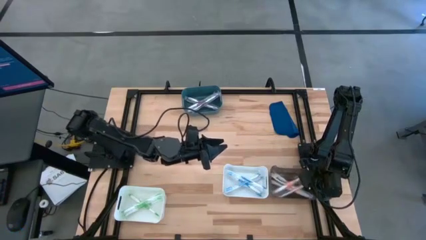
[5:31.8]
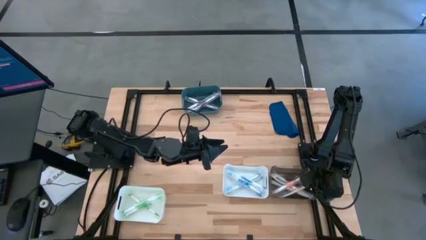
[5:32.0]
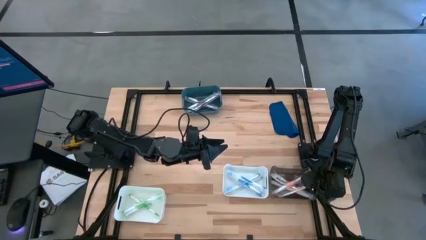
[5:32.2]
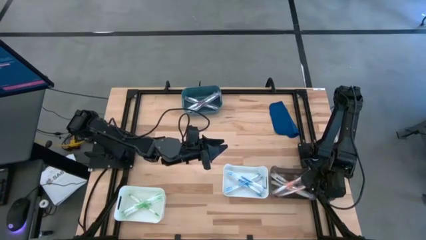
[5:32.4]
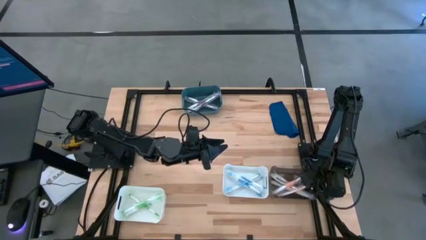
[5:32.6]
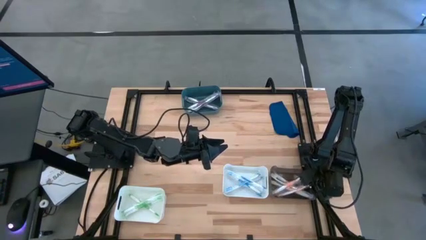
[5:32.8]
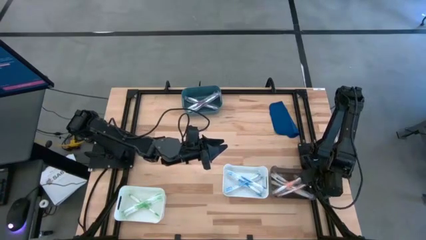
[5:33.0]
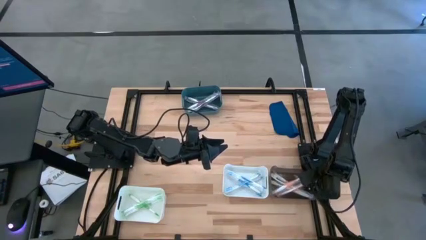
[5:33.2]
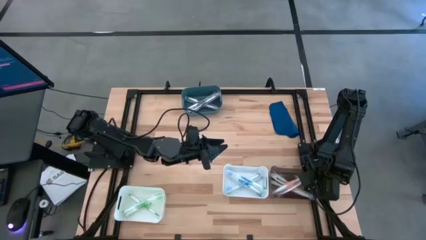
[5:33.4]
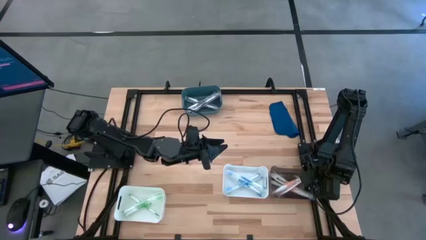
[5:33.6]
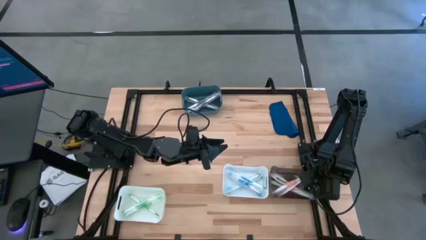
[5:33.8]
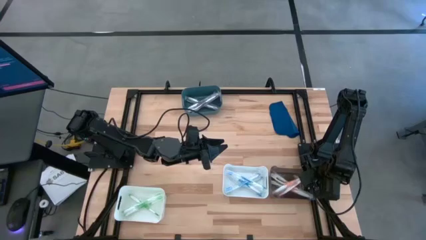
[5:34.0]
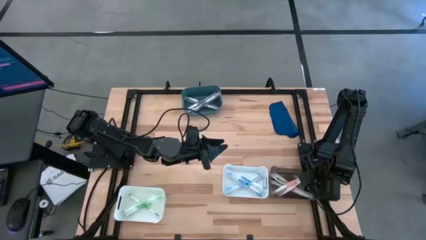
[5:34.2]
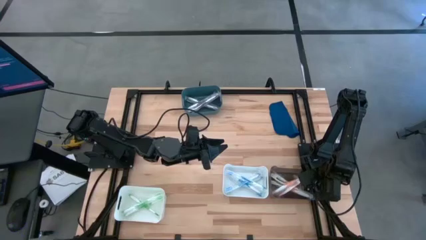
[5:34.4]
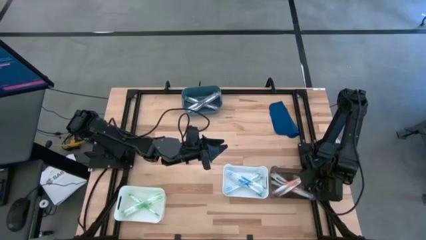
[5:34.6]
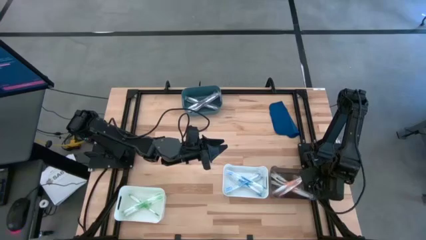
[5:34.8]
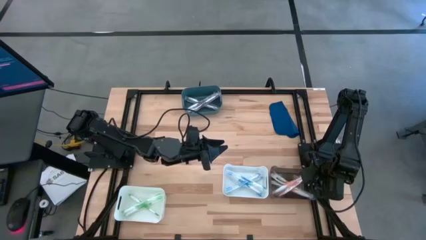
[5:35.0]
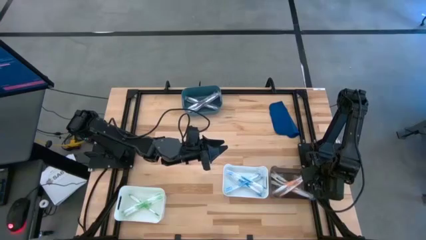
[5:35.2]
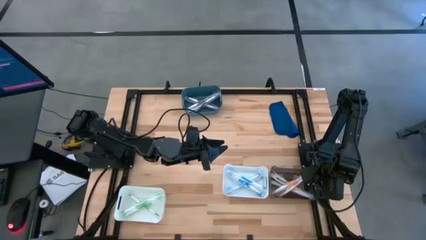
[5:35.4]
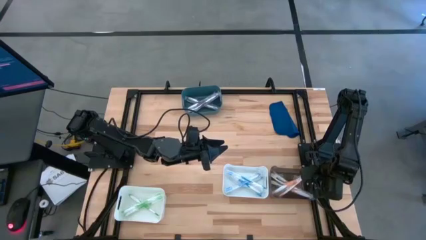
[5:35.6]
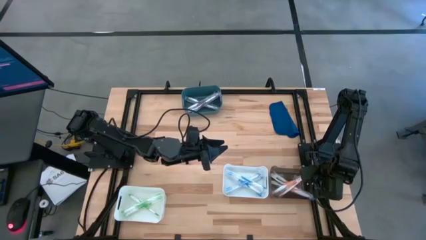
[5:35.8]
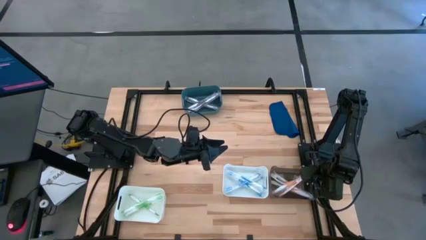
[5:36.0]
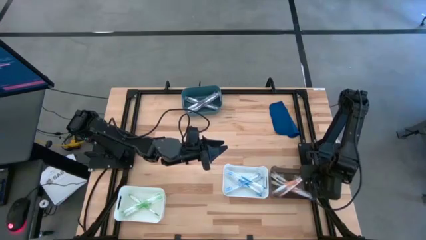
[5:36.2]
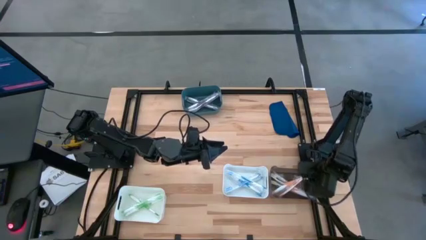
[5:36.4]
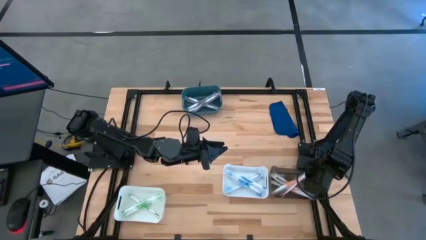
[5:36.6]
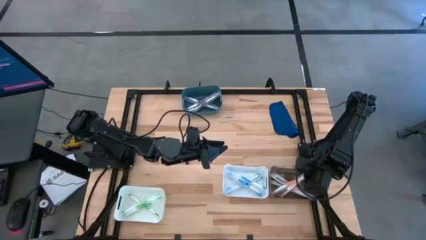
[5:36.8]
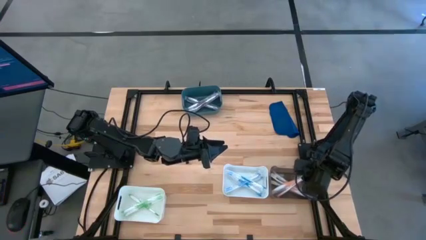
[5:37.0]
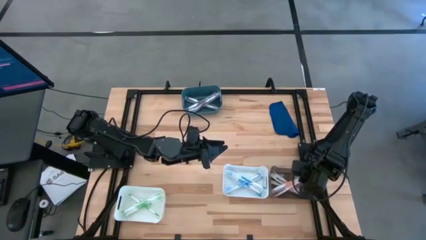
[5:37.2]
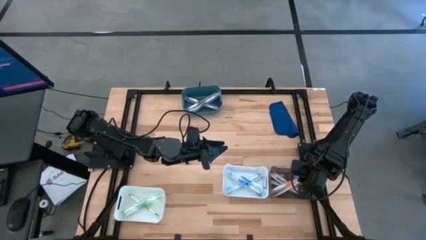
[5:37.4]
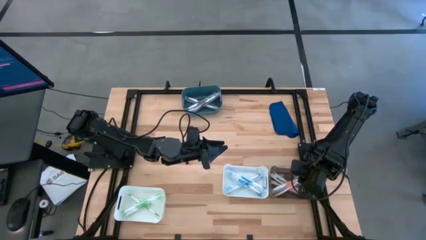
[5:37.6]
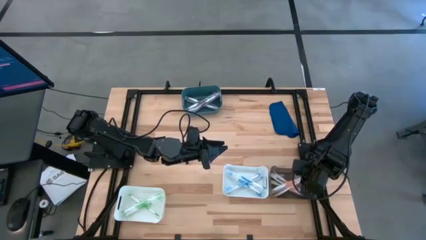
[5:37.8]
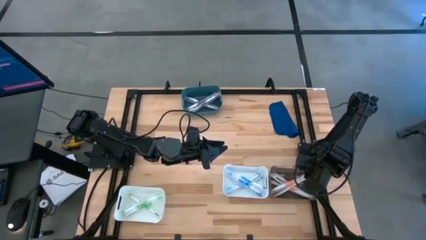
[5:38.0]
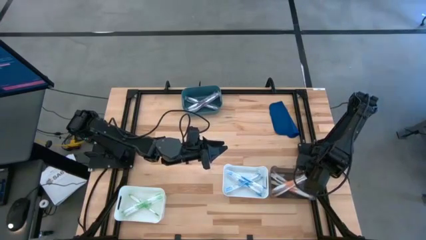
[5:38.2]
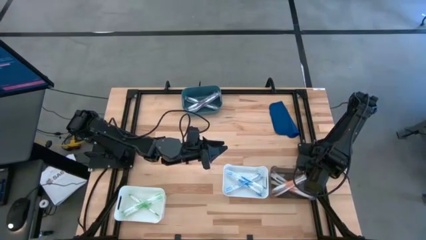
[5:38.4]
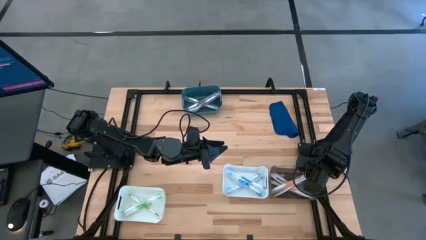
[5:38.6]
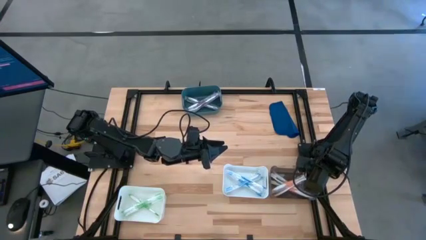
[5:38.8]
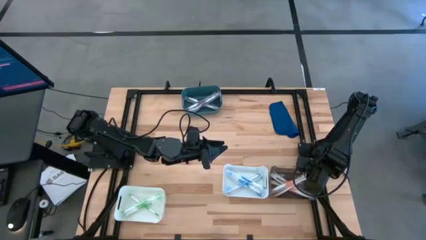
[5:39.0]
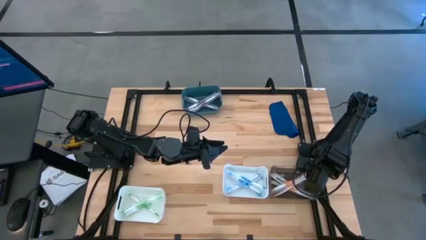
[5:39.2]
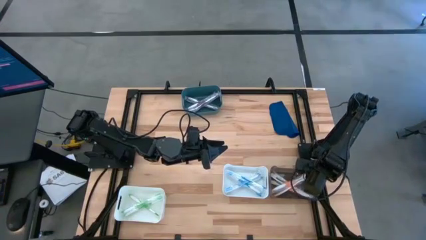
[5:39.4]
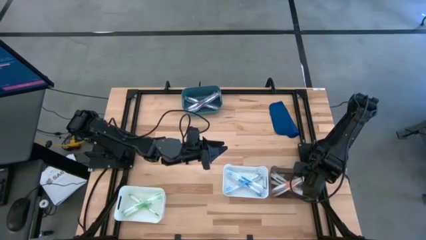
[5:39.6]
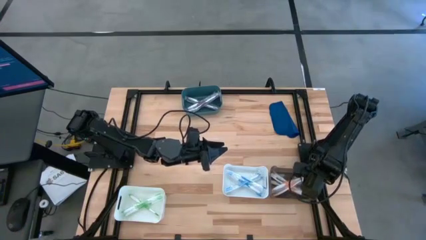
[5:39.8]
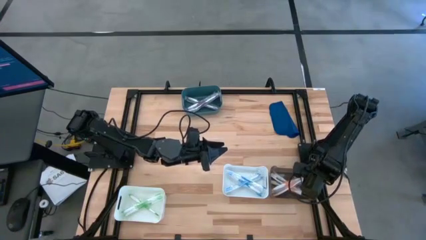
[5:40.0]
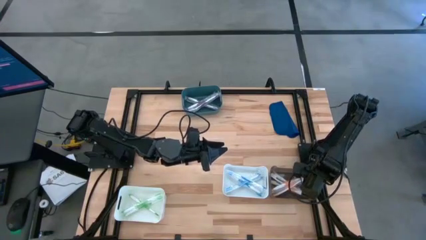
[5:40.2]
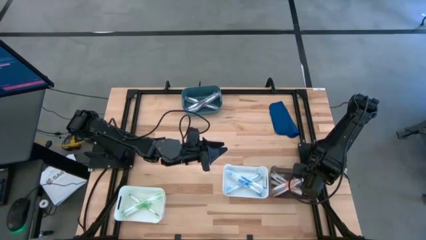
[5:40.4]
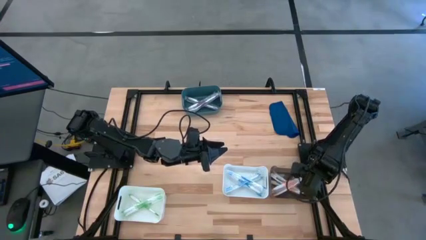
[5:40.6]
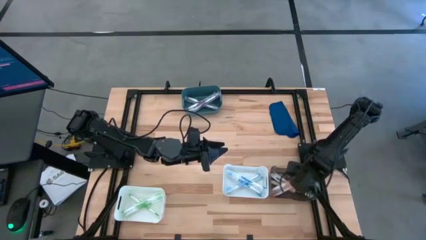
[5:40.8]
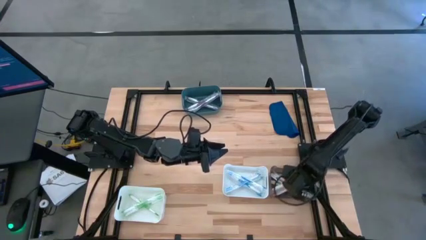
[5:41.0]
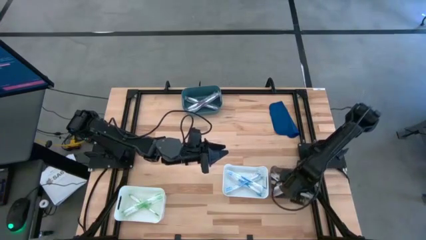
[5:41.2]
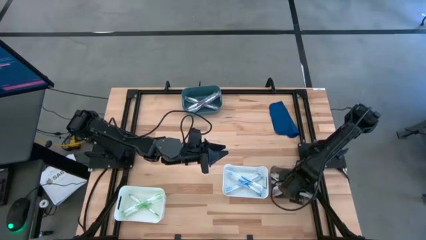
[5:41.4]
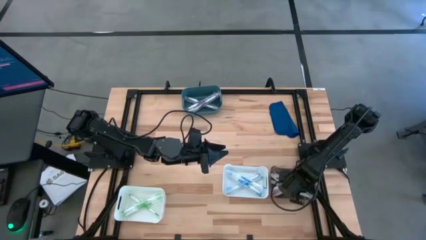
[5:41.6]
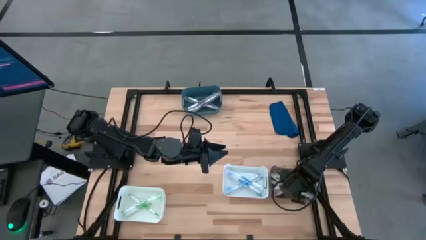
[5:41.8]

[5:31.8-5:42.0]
Task: Pick & Place Toothbrushes
Put the orange toothbrush into the black bin

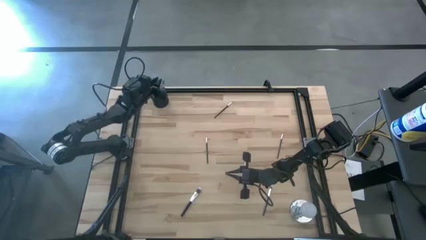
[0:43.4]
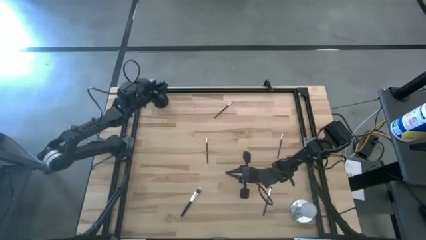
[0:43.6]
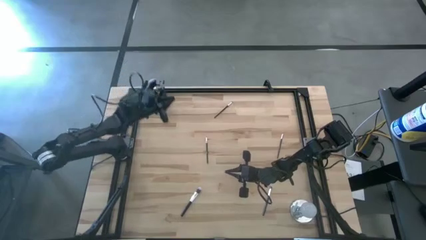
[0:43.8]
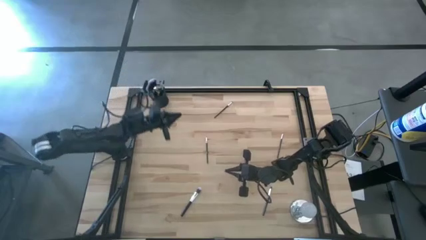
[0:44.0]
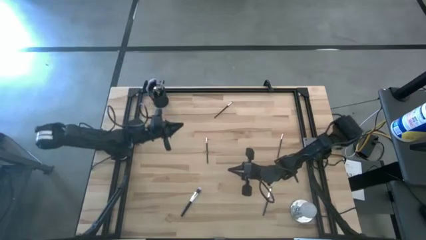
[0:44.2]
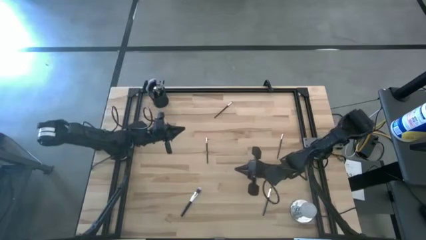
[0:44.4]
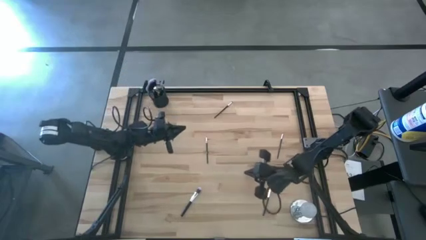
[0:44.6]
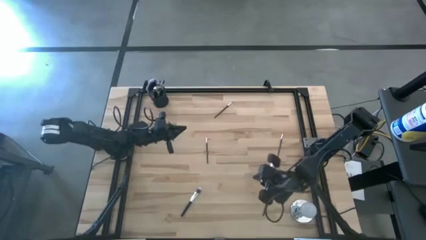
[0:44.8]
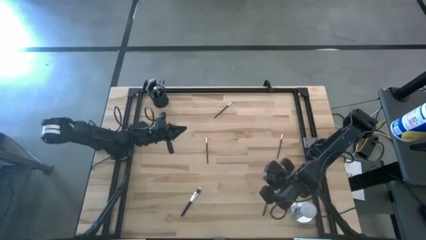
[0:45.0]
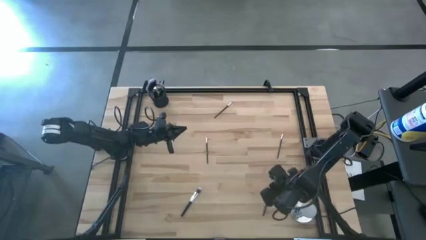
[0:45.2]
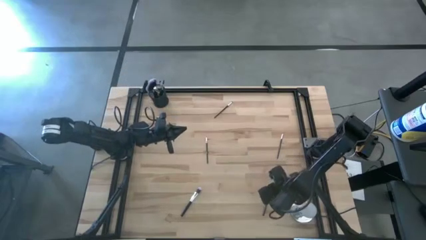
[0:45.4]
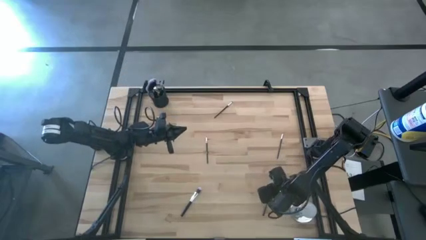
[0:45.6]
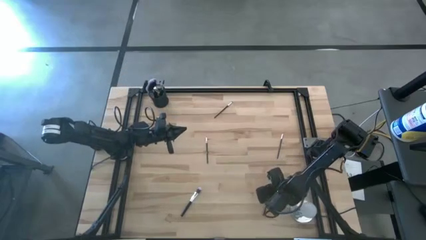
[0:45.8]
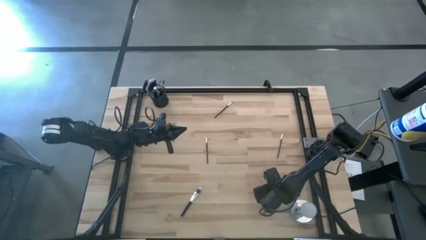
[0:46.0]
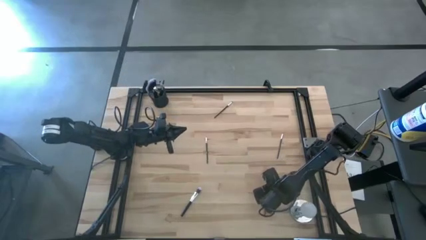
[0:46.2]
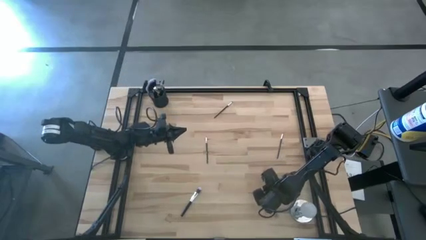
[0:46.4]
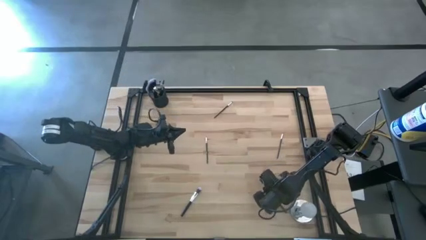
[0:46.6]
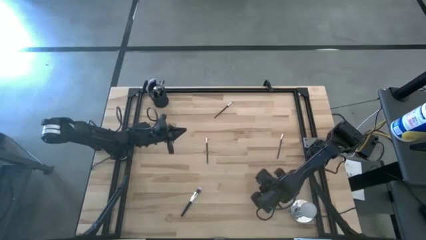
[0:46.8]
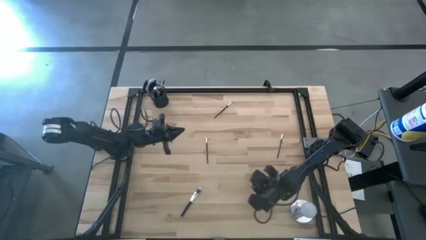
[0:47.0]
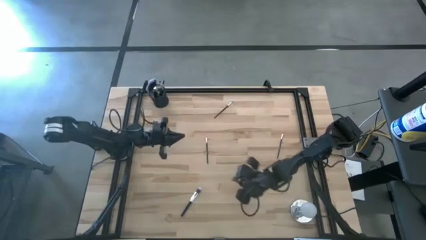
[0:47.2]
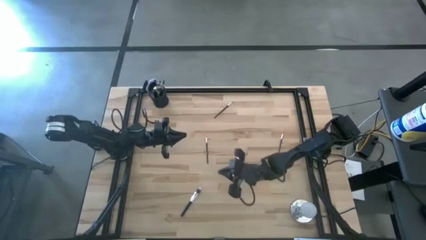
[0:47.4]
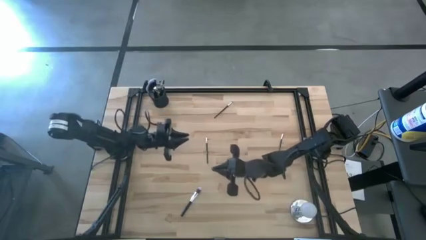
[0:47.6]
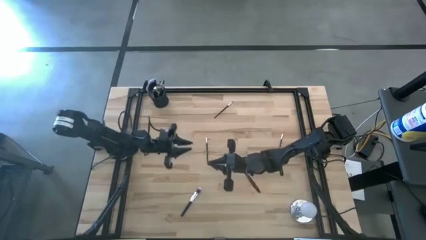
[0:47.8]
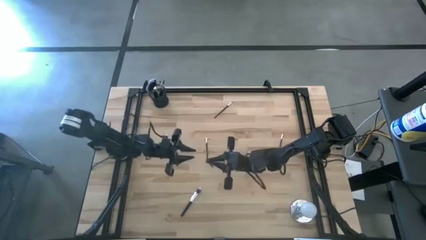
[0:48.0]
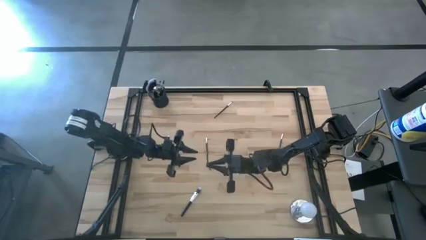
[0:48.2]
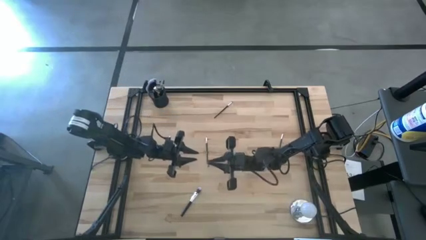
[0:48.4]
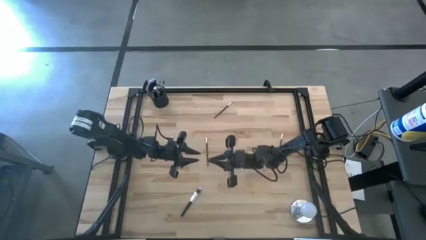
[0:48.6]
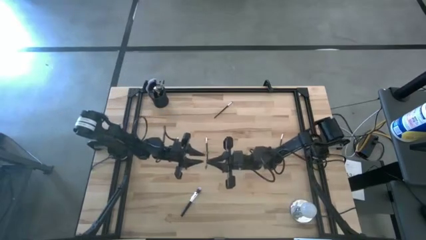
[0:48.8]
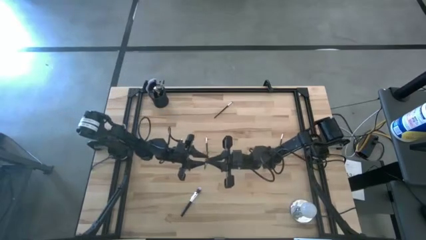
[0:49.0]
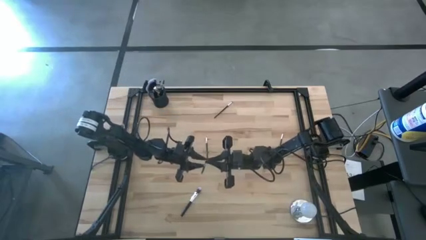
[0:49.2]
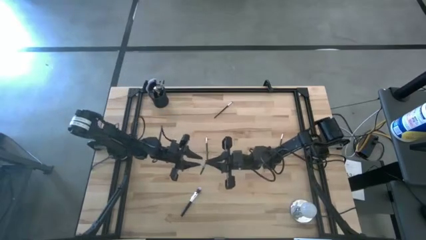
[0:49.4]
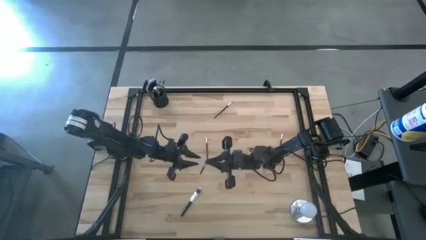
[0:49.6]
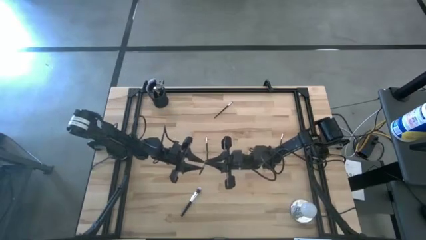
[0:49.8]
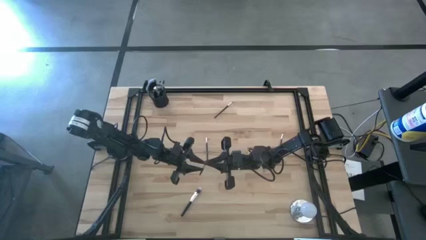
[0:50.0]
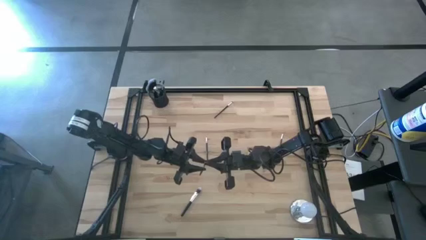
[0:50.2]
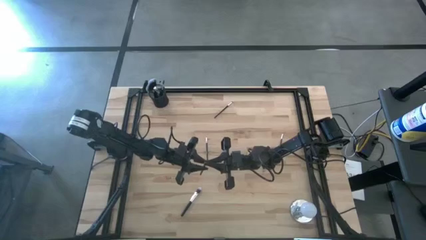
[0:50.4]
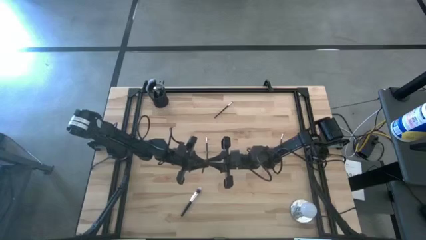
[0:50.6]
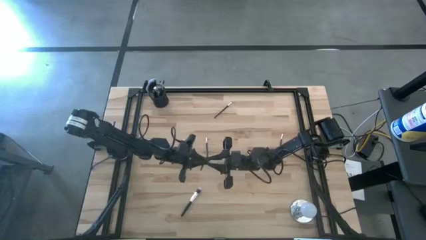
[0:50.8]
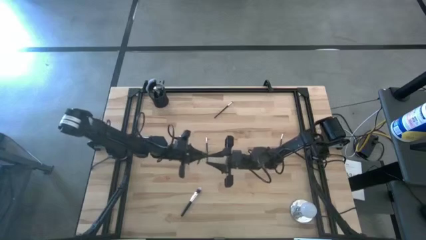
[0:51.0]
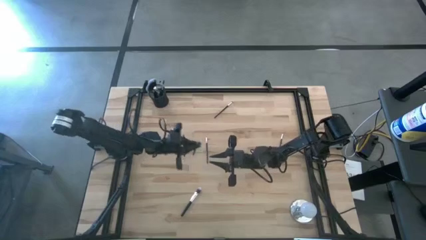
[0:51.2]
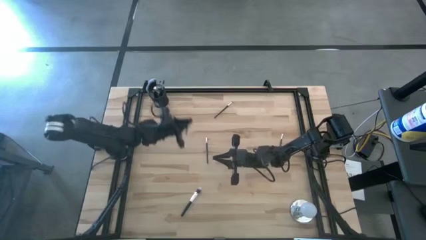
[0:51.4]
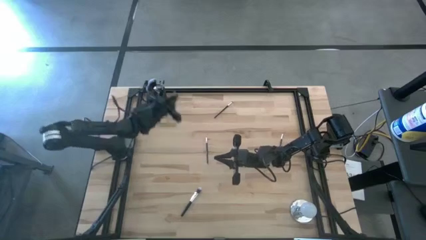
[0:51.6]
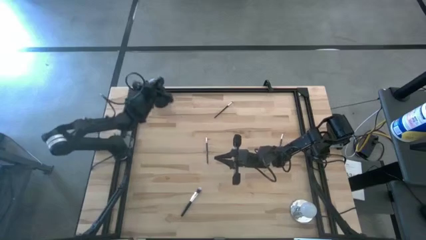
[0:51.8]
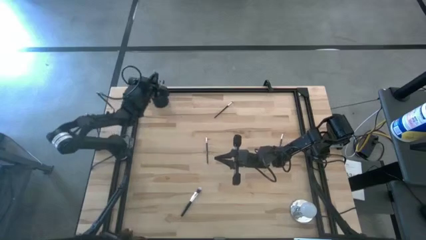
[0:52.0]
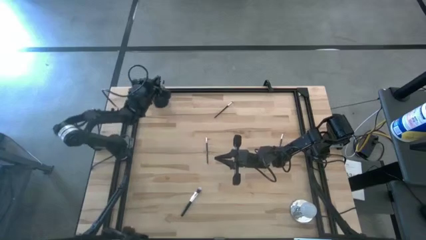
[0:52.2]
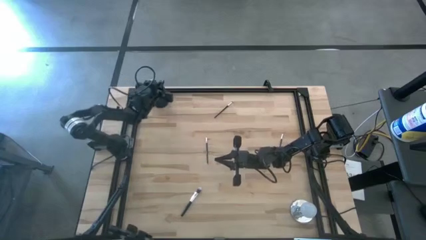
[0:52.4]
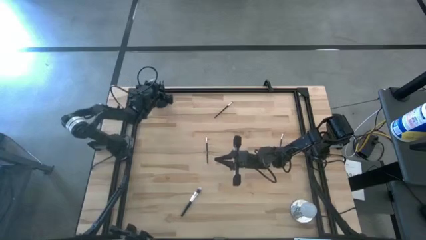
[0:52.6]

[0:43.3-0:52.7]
Task: Put items in baskets/containers
Put the eyeshadow brush into the holder
